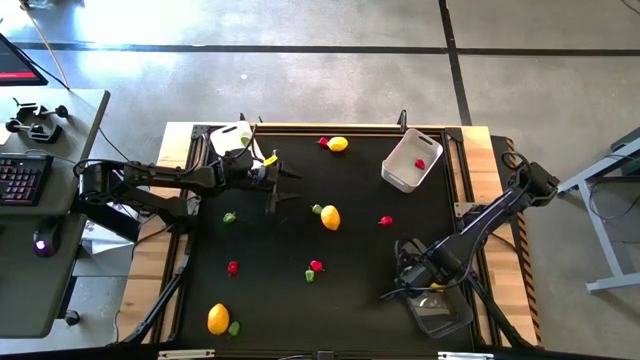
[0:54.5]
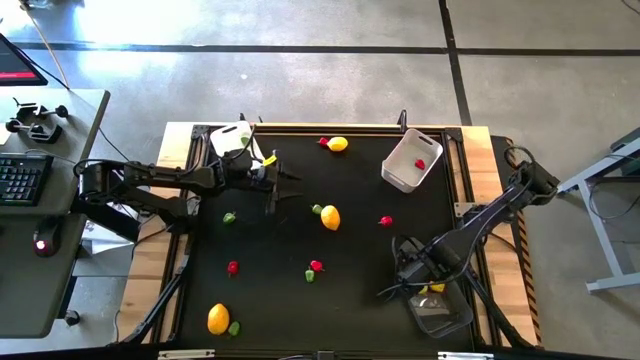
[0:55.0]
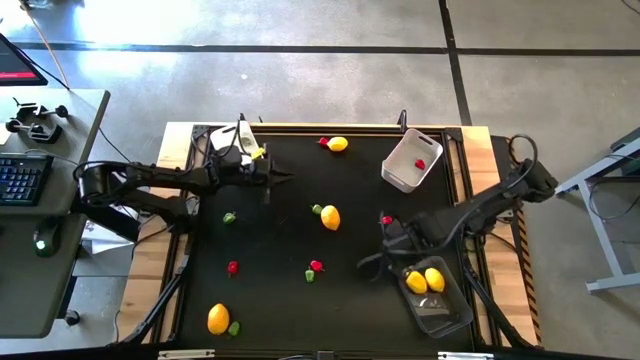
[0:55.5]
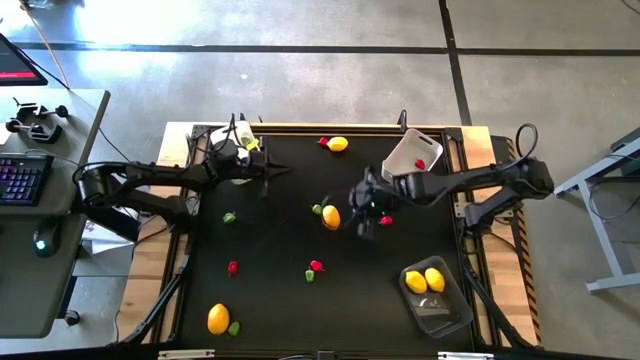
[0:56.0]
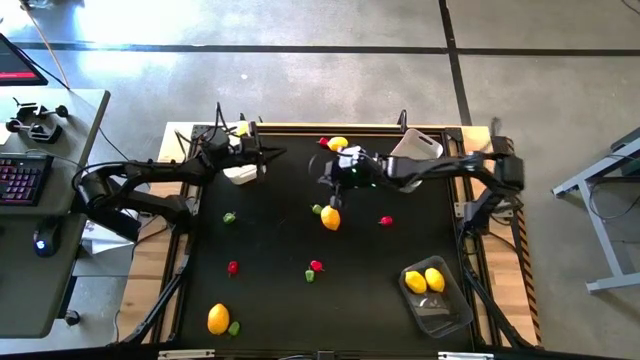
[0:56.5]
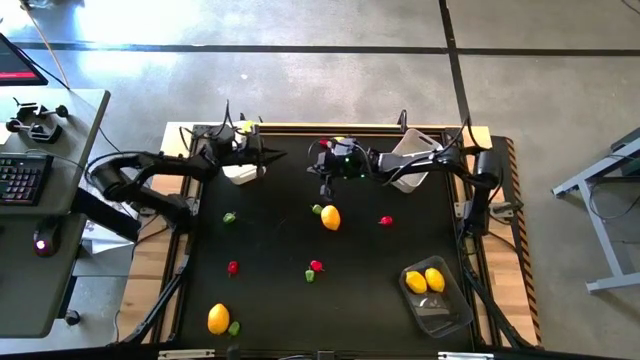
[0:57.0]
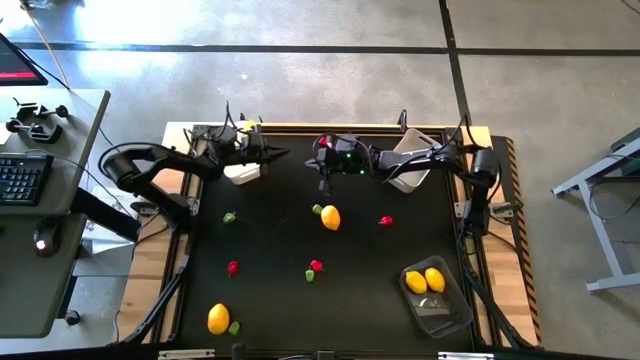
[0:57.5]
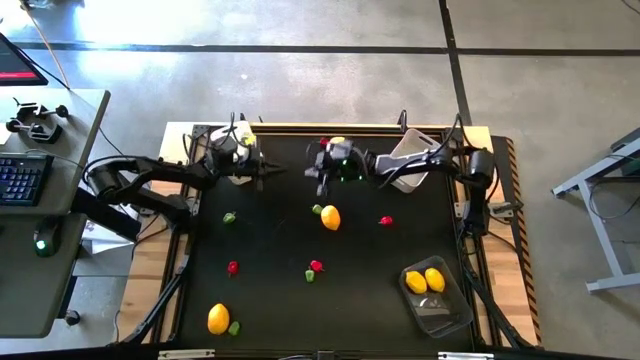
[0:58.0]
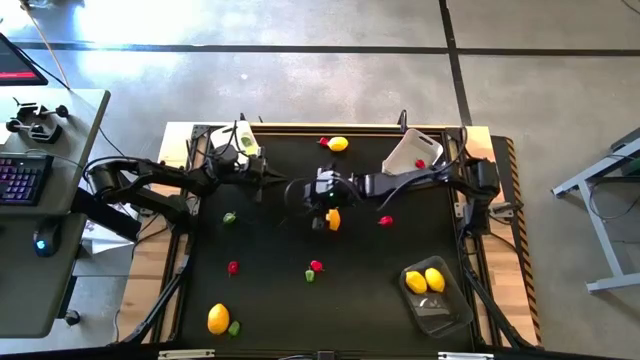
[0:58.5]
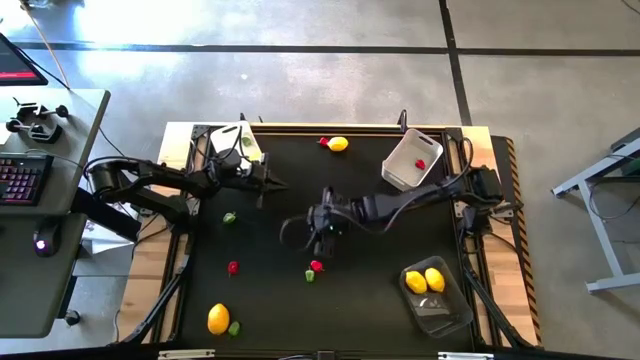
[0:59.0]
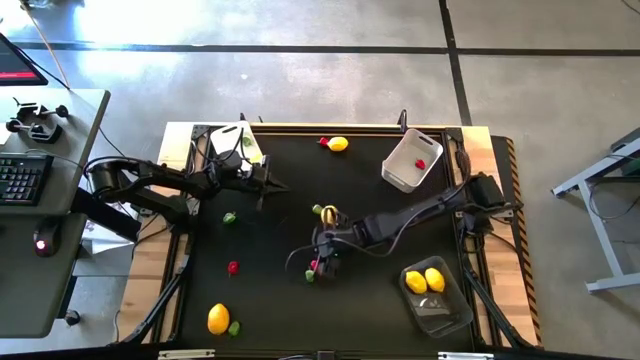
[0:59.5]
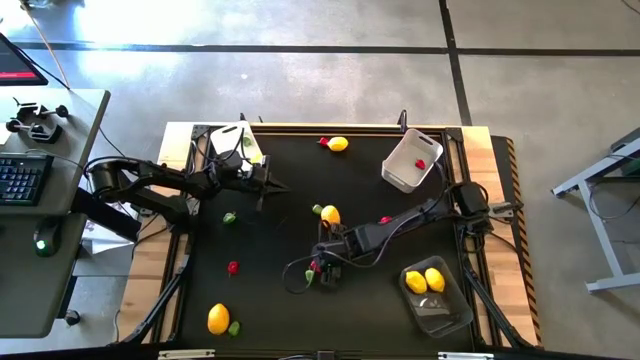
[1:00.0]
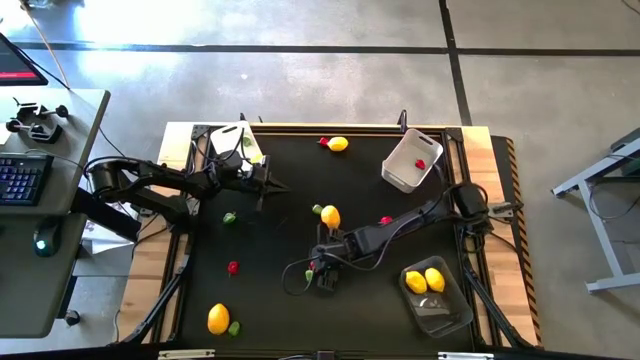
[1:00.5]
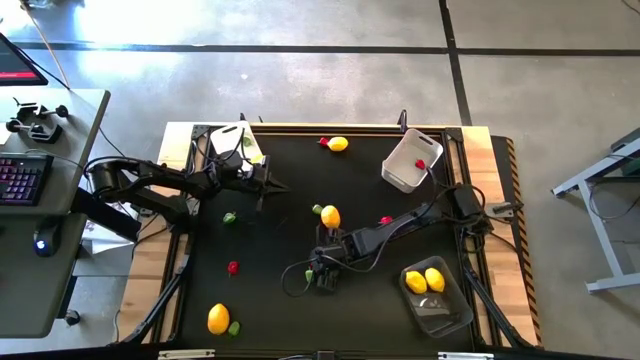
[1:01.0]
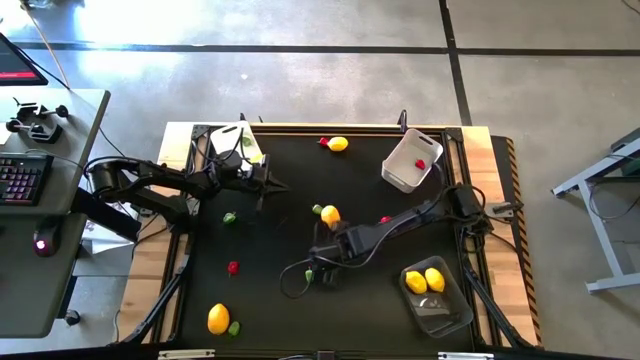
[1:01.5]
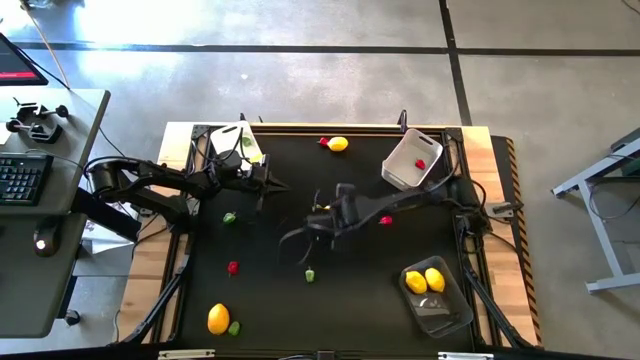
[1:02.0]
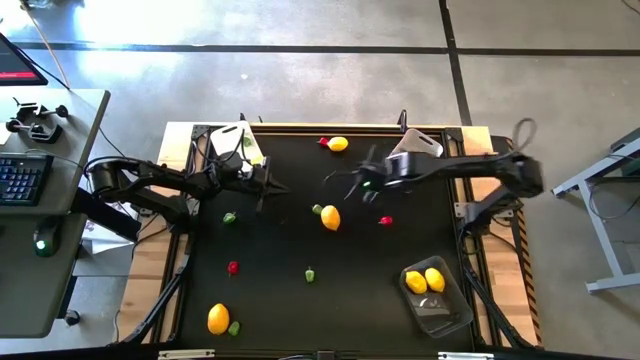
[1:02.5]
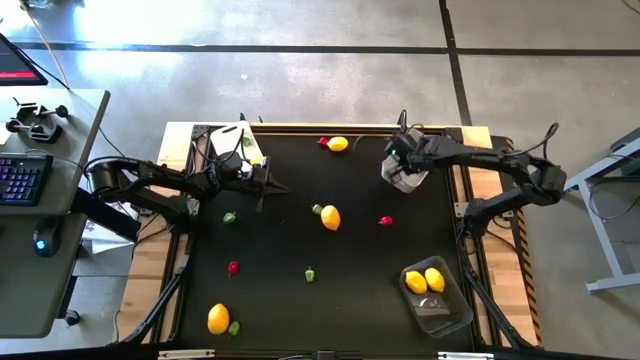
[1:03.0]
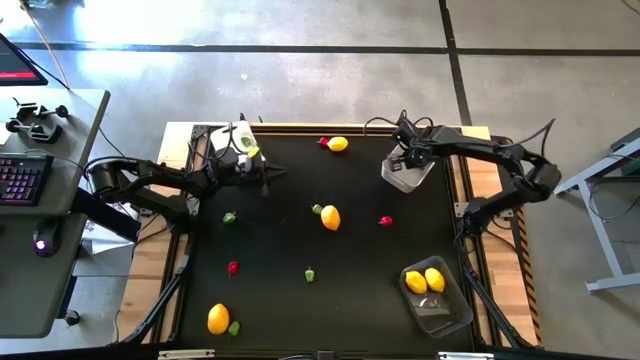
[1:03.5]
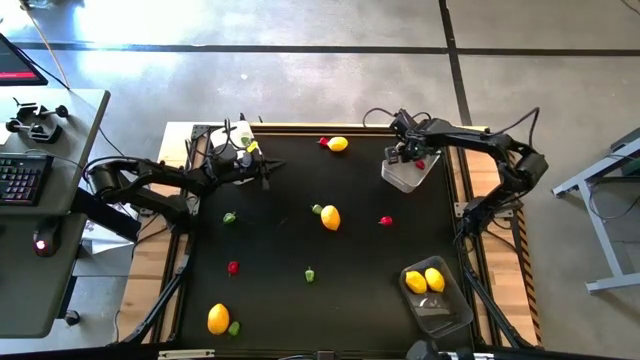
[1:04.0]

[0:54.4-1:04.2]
Task: Sort produce into baskets
Put the red chili pepper into the gray bin

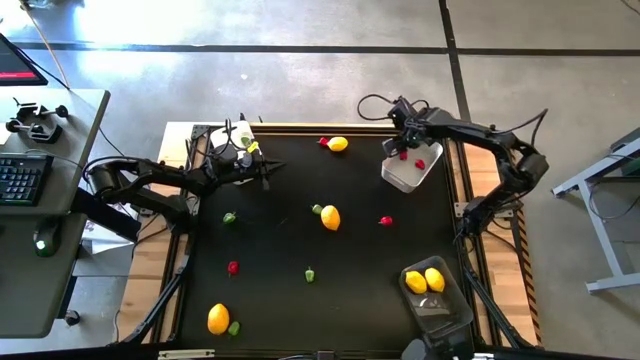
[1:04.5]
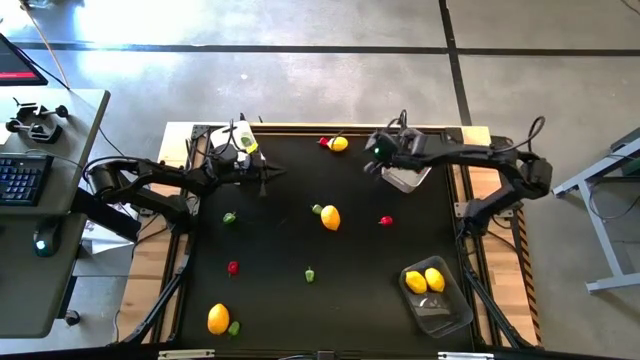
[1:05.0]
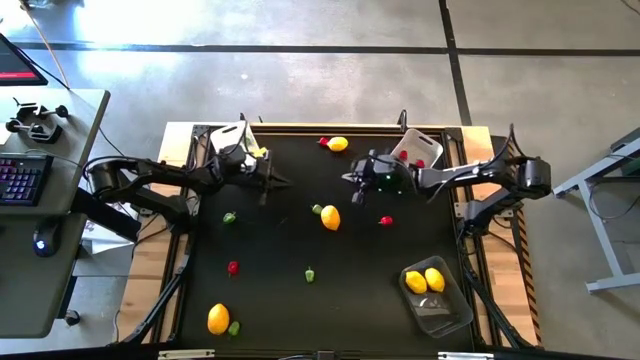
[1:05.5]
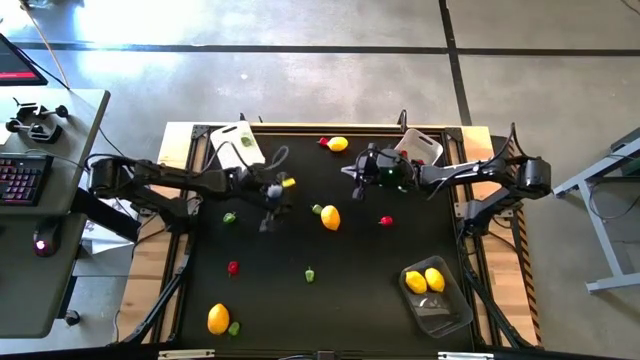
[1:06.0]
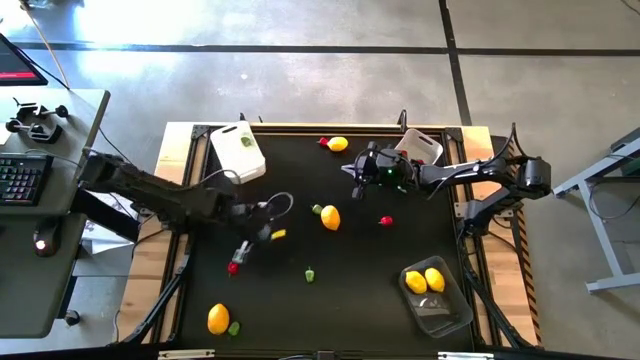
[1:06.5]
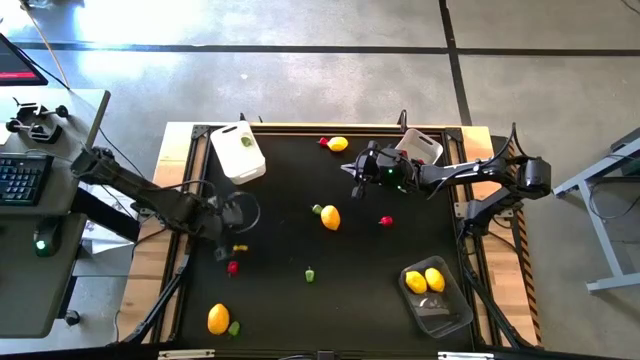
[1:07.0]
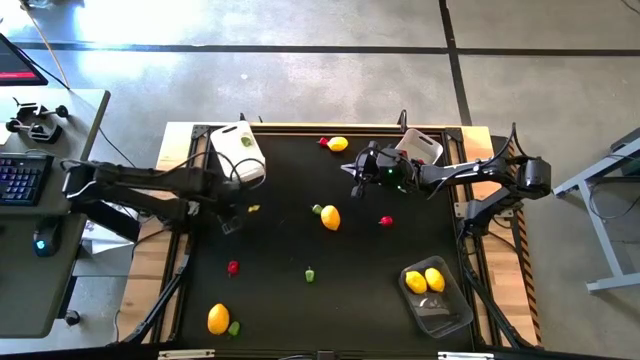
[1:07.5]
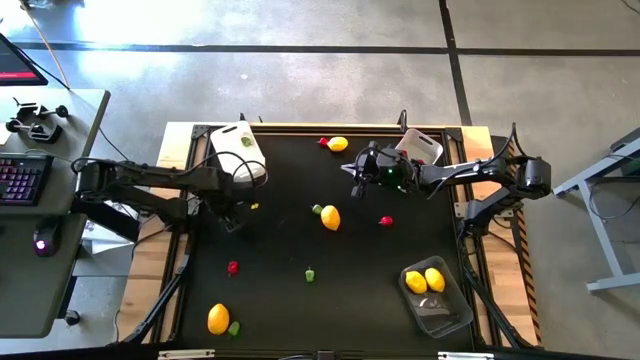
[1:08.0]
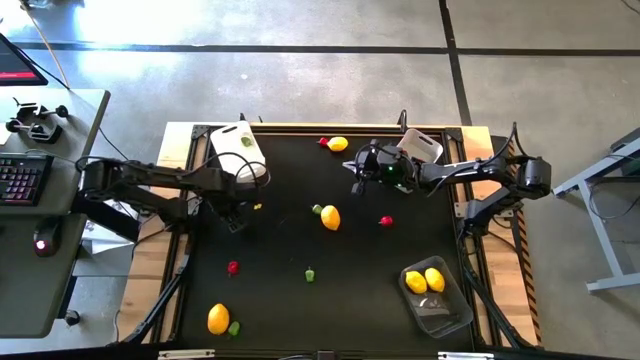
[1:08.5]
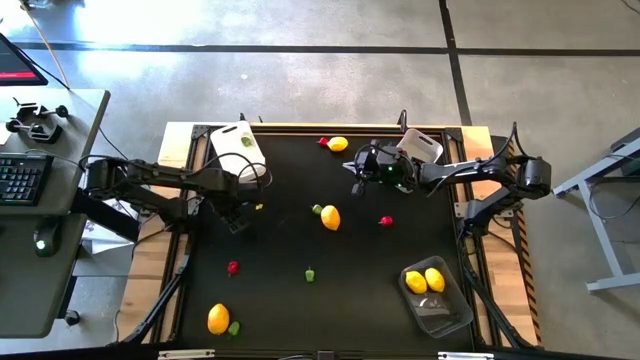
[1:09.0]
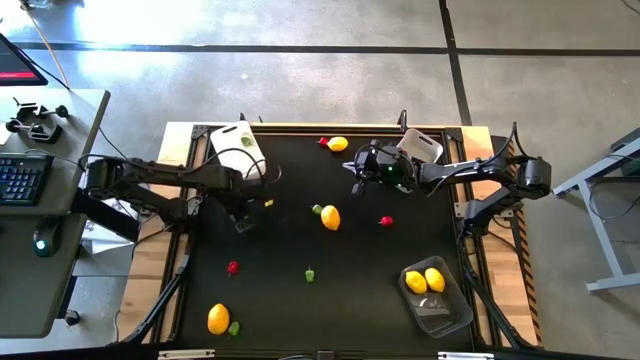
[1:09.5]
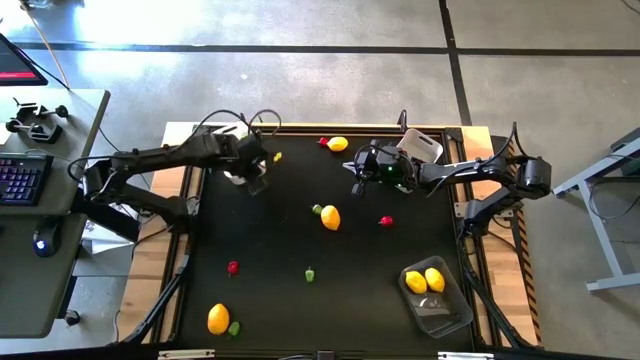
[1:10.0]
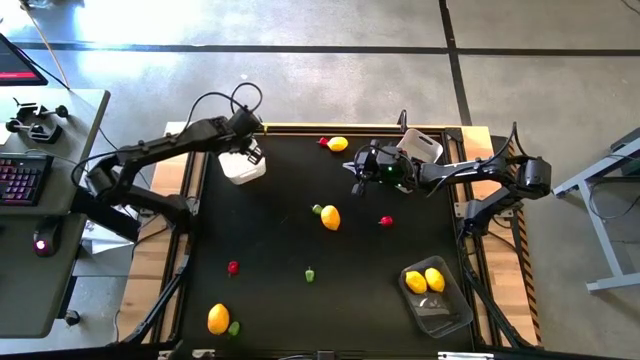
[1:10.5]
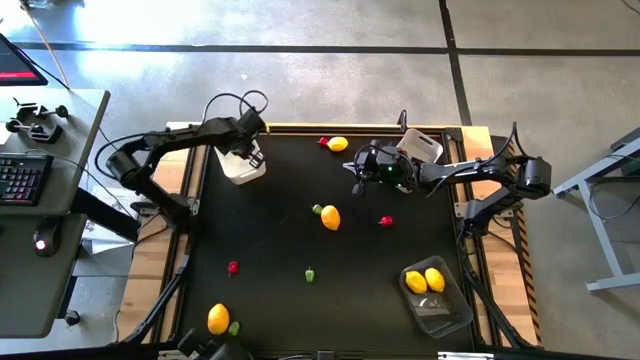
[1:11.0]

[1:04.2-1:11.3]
Put the green chili pepper into the white bin

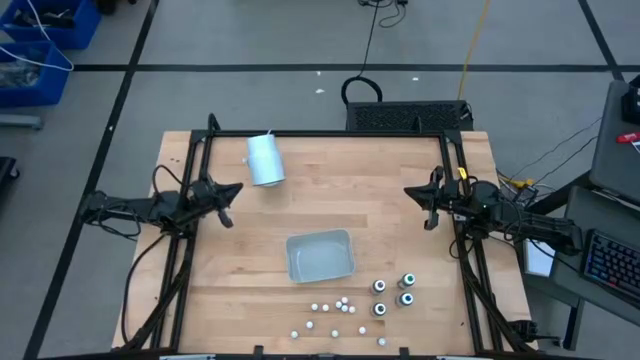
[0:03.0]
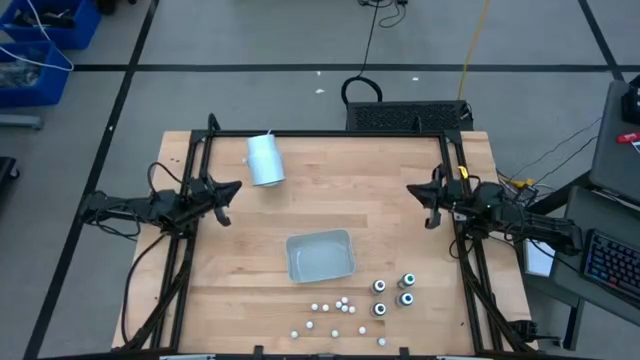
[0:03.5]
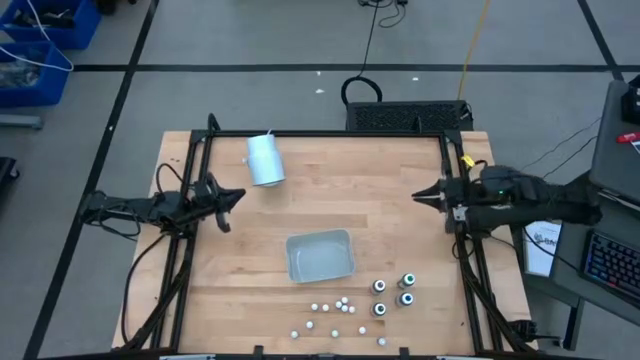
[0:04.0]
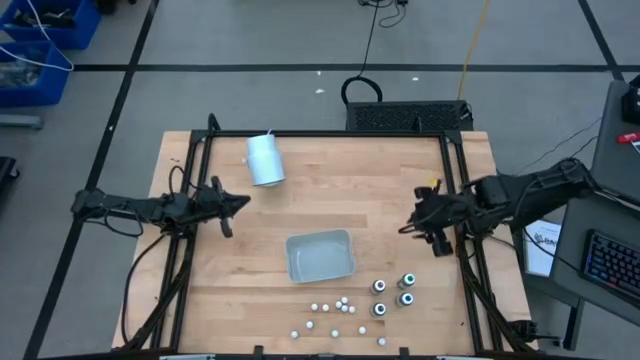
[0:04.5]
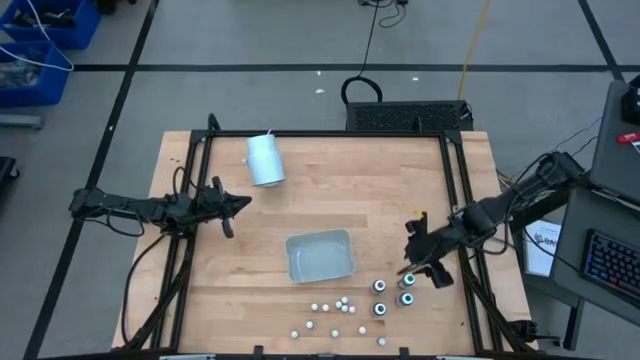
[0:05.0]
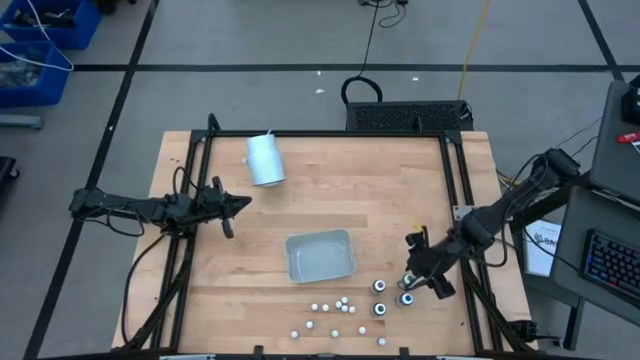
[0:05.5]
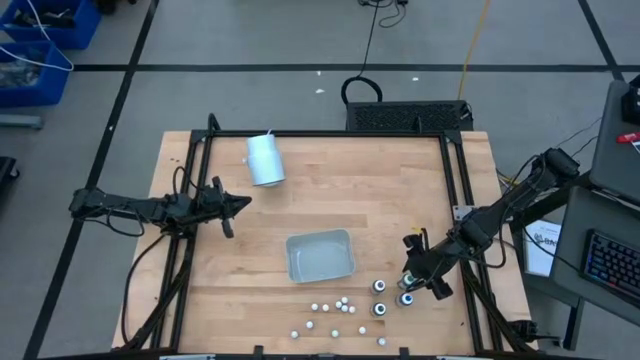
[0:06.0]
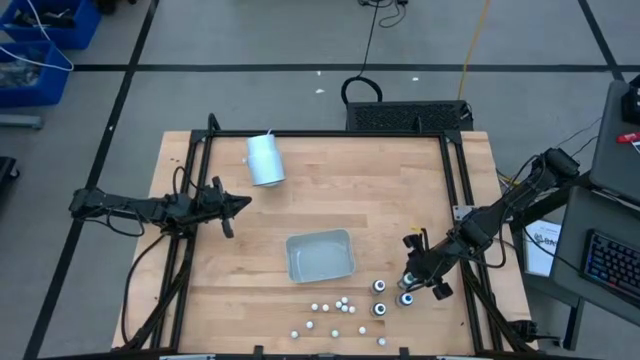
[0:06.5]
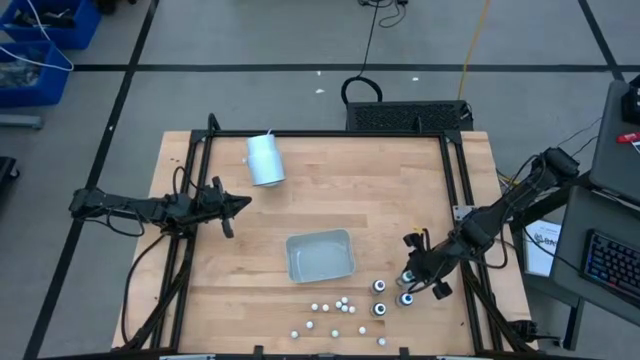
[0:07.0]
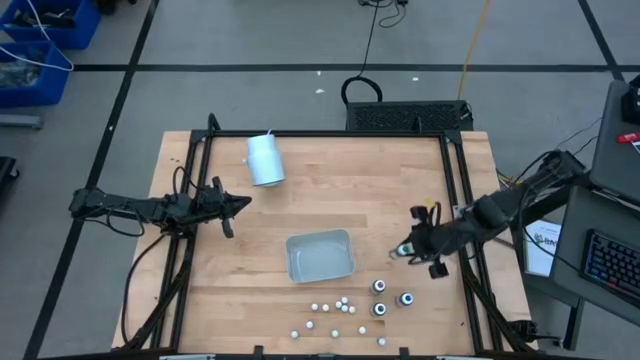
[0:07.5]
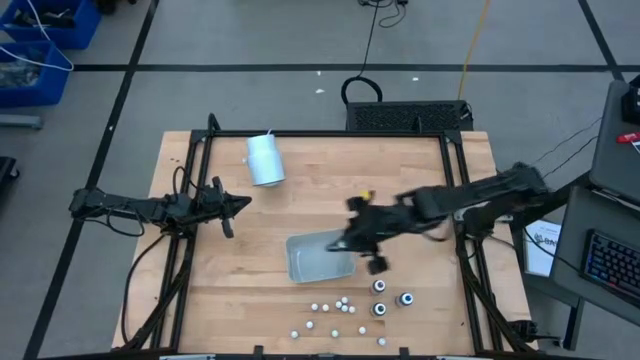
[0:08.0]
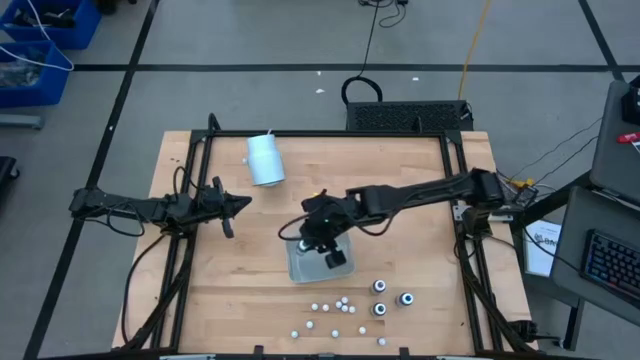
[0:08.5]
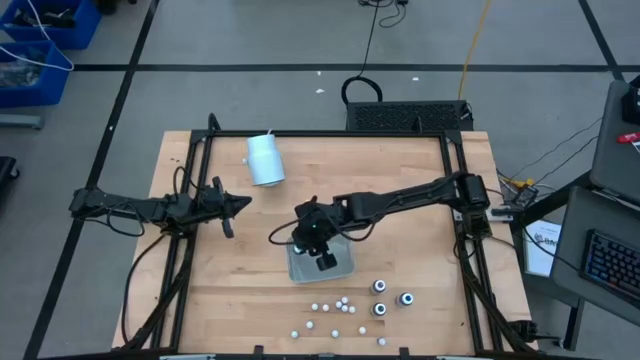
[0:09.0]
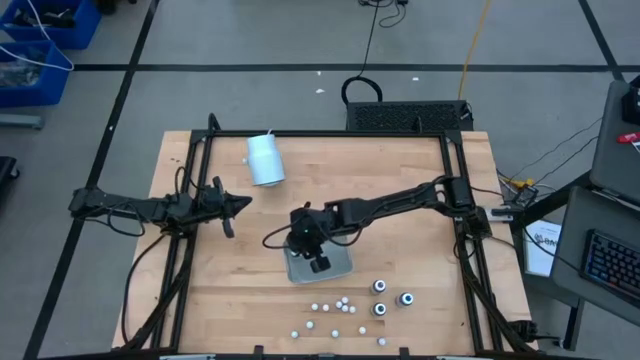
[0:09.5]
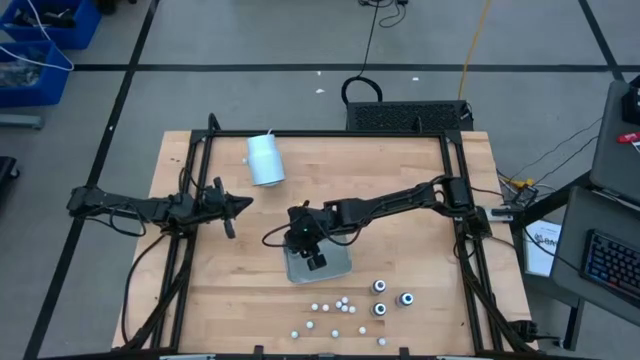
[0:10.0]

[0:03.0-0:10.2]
Task: Pick & Place food coloring
Put the big green food coloring bottle into the gray bin
